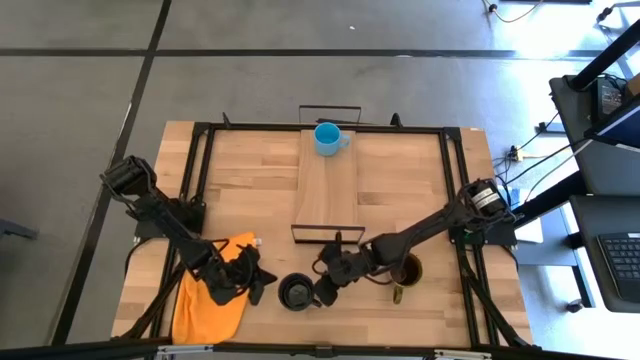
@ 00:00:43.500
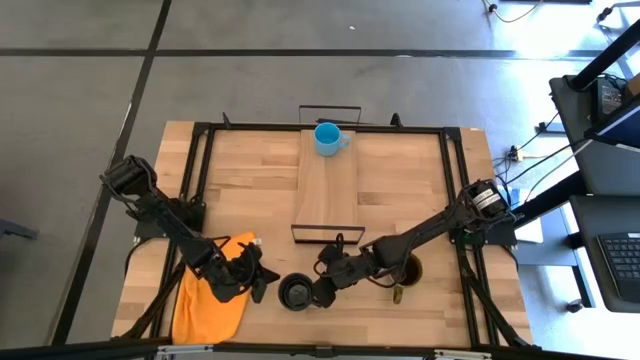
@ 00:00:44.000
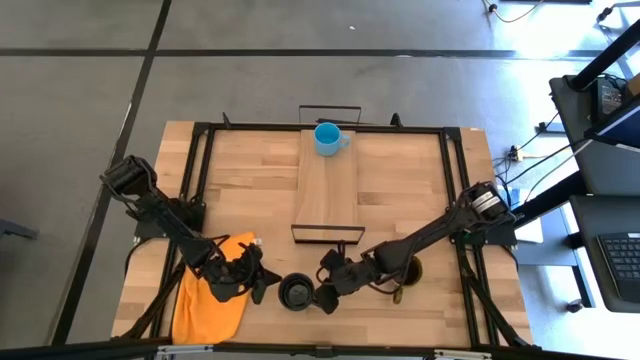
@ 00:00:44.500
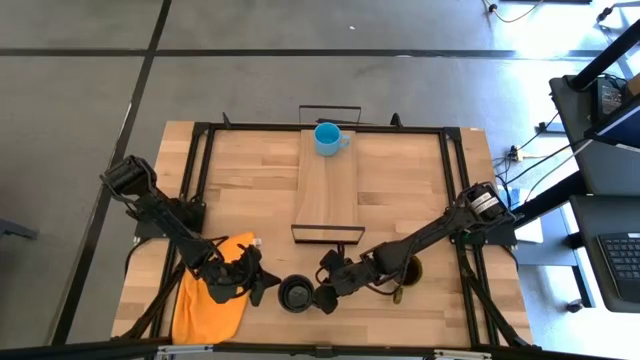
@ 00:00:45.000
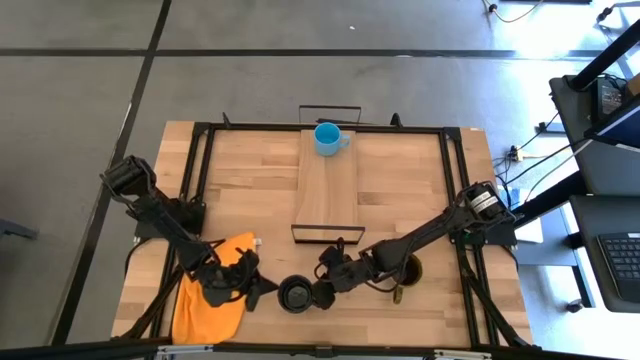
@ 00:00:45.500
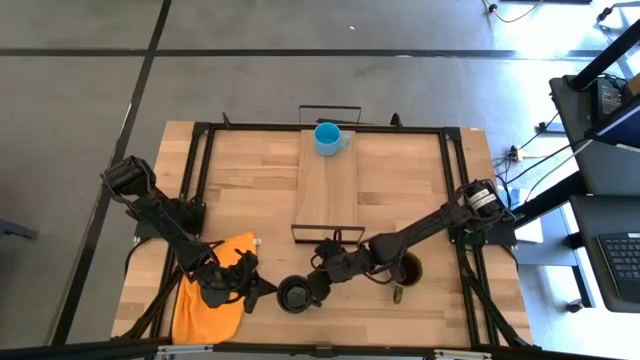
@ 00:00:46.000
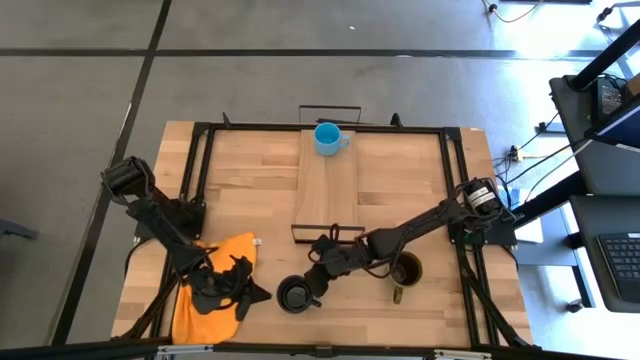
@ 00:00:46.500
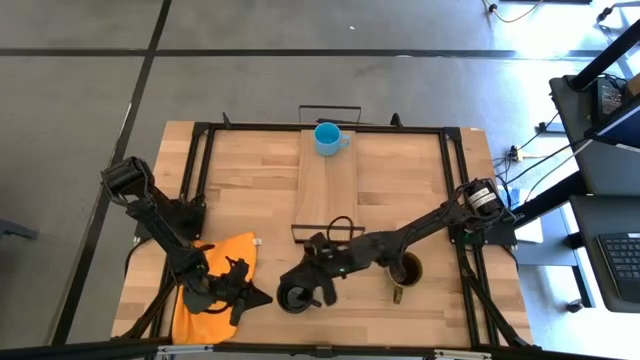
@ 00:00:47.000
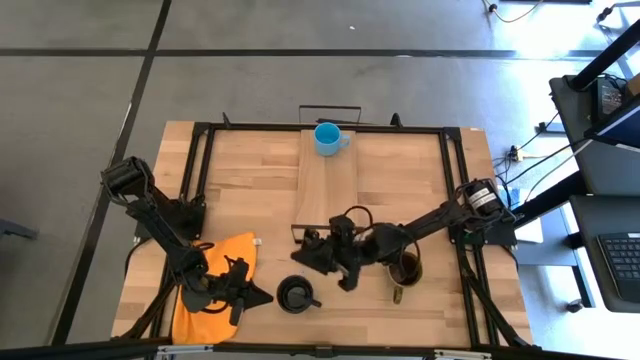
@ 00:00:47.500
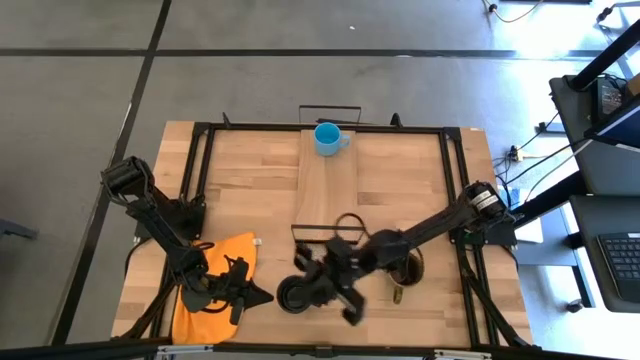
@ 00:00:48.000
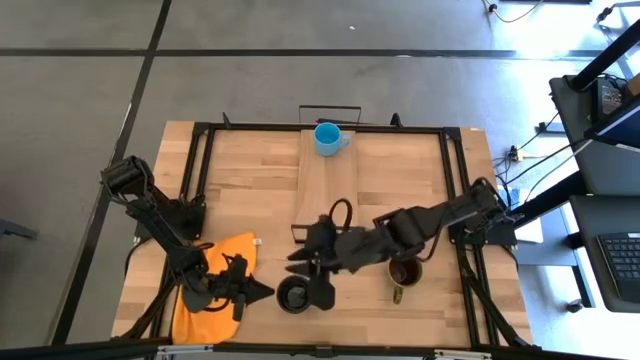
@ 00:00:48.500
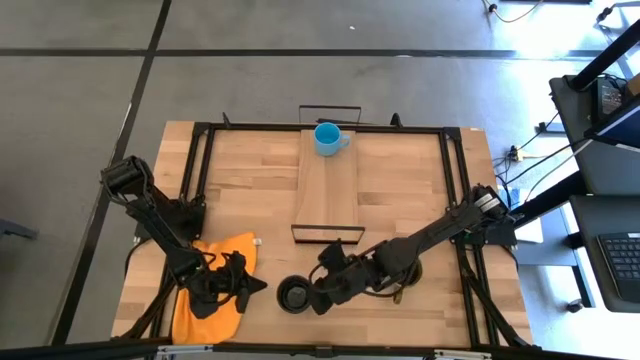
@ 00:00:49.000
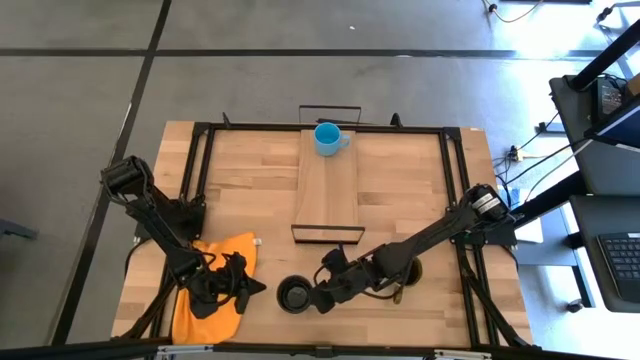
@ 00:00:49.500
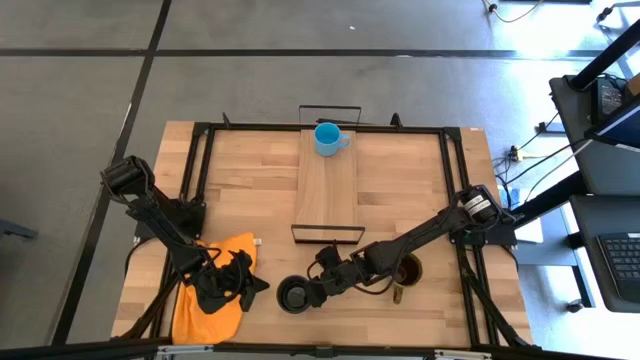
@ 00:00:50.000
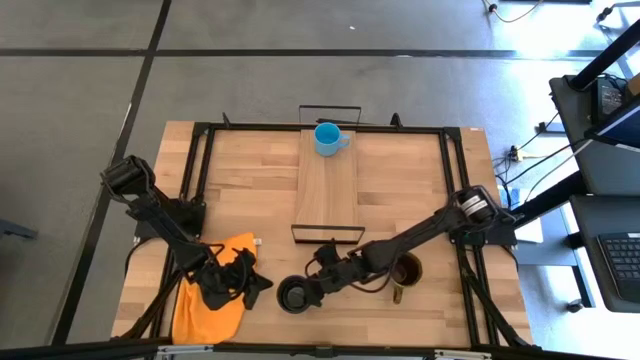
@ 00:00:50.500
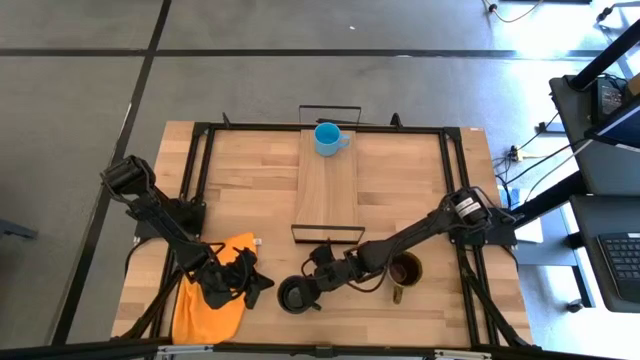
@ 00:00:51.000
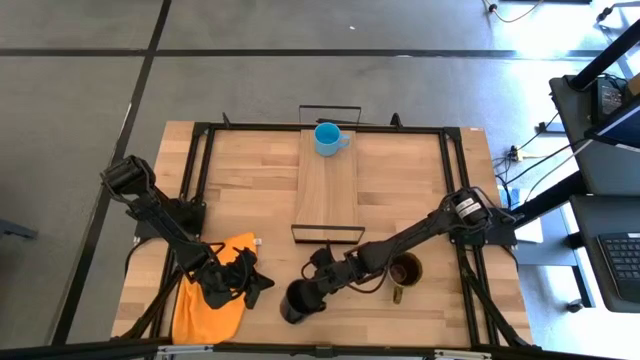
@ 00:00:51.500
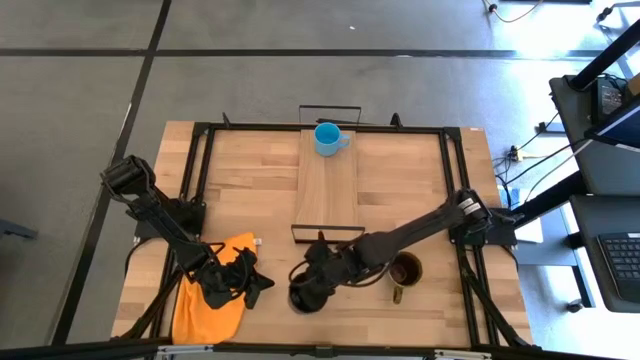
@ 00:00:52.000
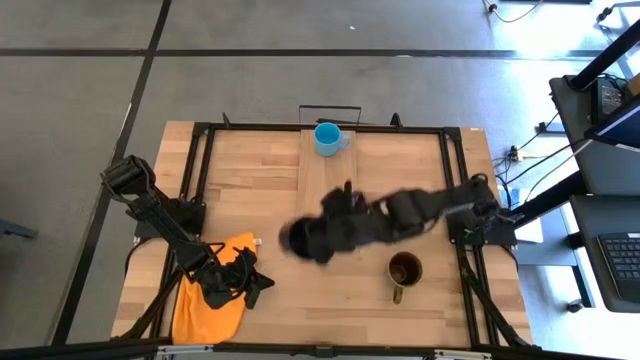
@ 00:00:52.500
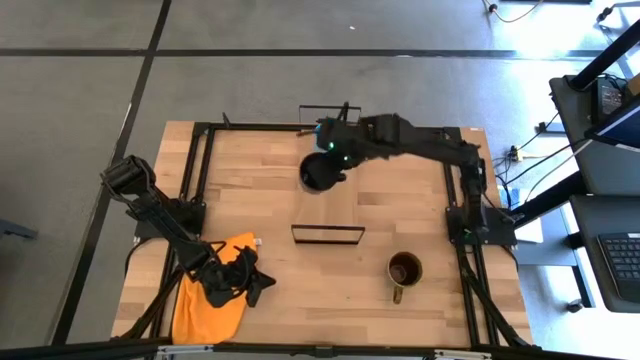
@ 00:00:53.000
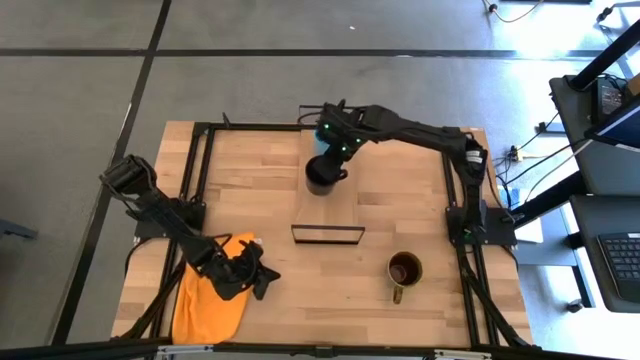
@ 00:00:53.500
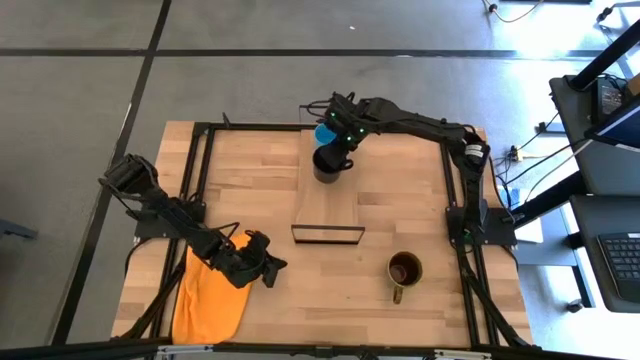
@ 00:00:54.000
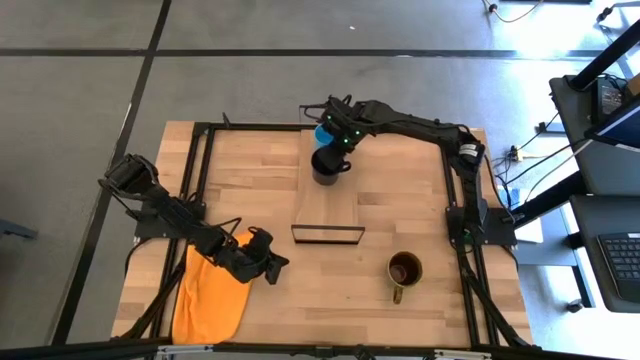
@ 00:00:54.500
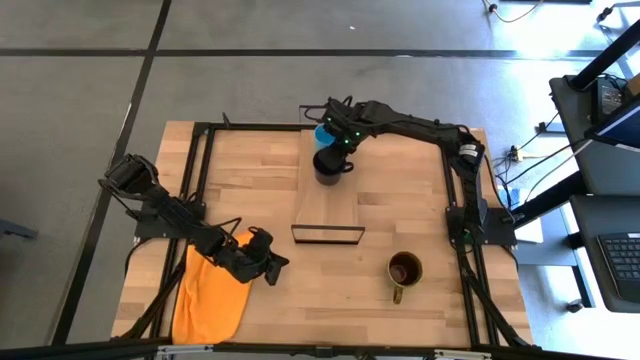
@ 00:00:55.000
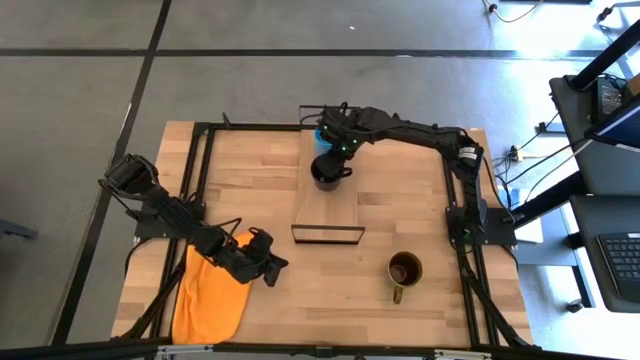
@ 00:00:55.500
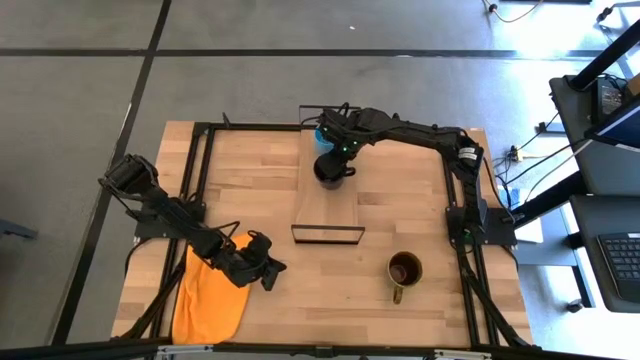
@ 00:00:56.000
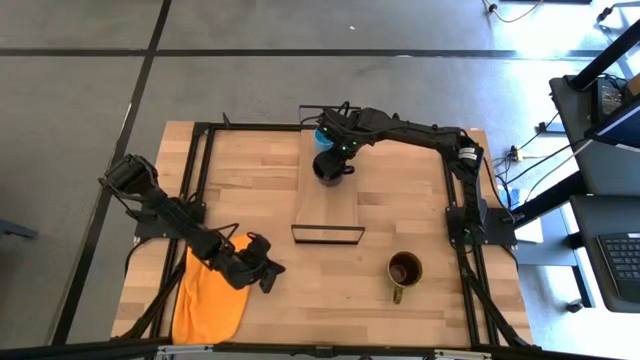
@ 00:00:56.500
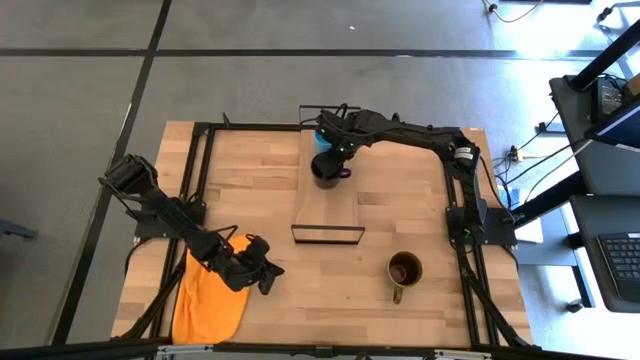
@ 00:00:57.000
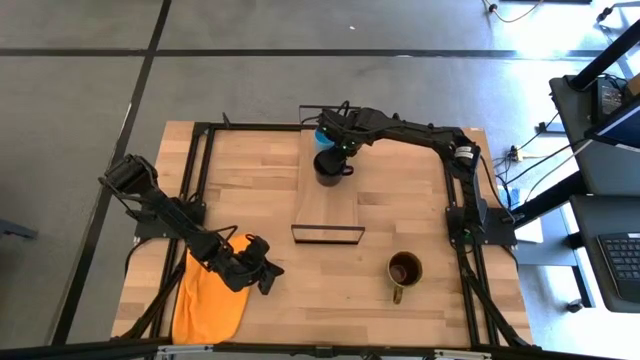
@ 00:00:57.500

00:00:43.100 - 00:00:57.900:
Task: Stack small to large cups/mugs on shelf
Put the dark blue mug on the shelf

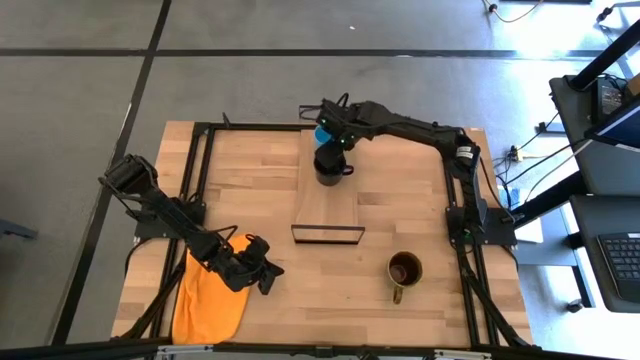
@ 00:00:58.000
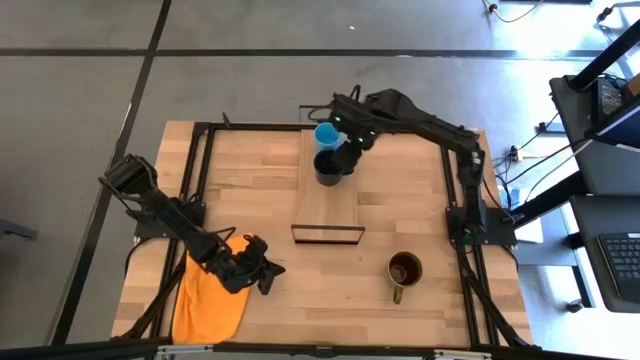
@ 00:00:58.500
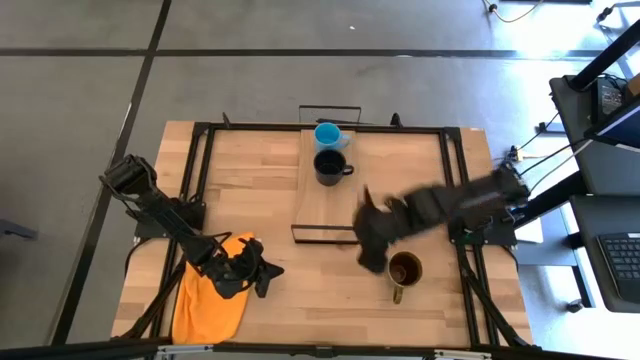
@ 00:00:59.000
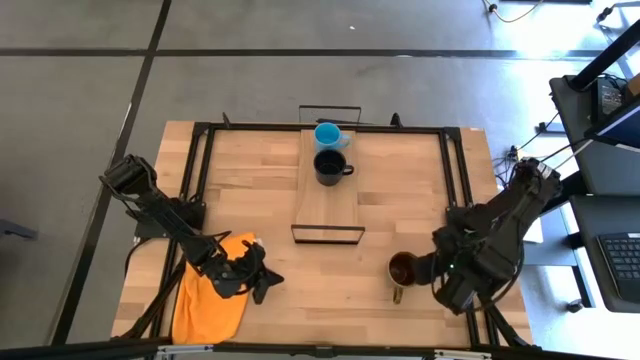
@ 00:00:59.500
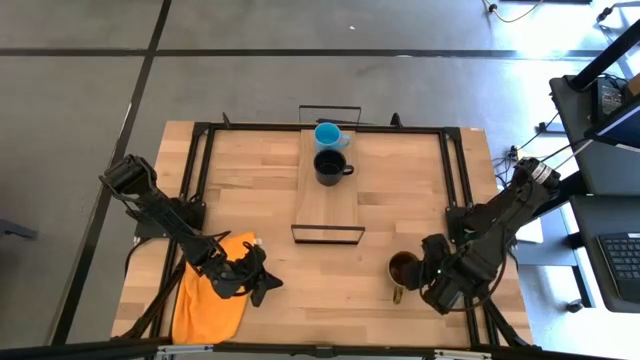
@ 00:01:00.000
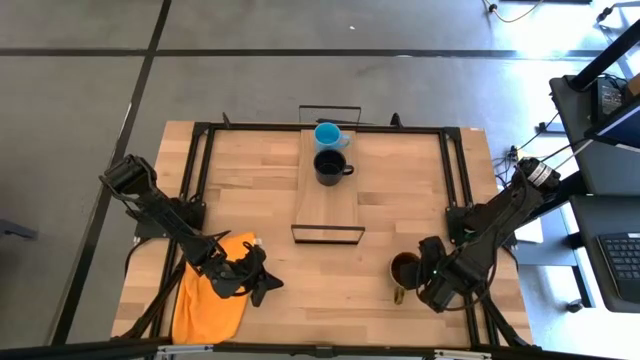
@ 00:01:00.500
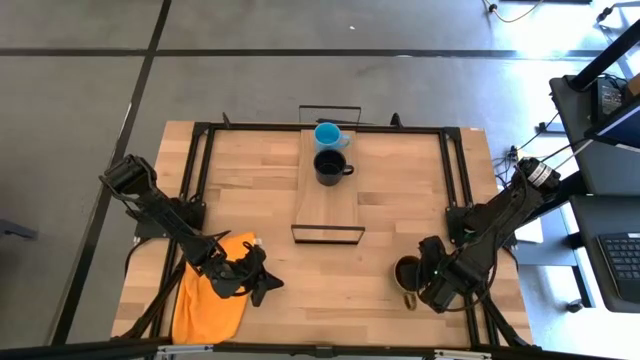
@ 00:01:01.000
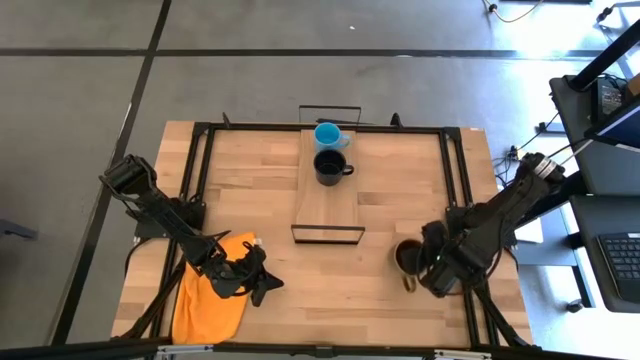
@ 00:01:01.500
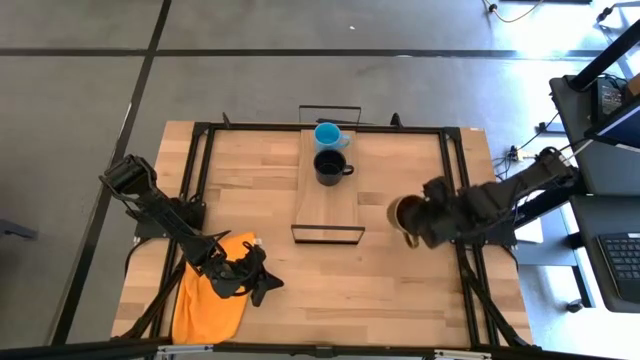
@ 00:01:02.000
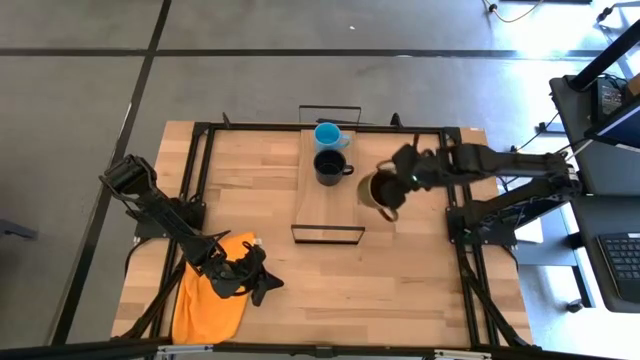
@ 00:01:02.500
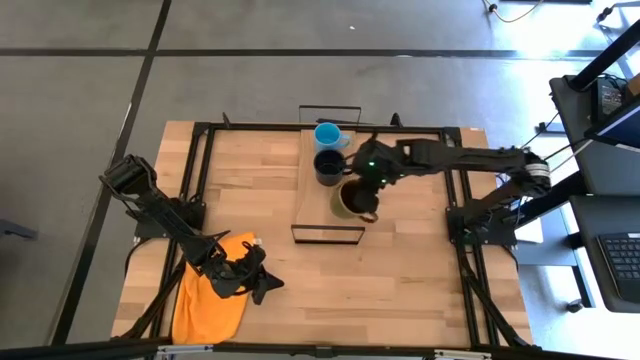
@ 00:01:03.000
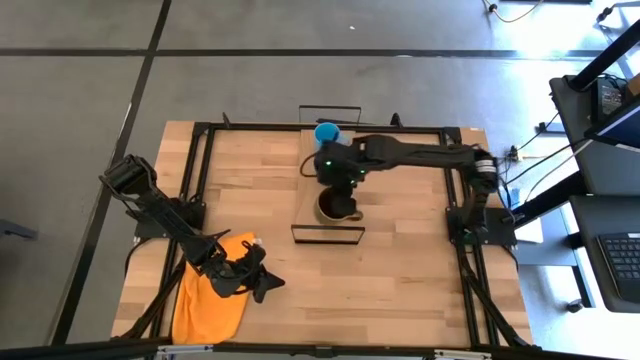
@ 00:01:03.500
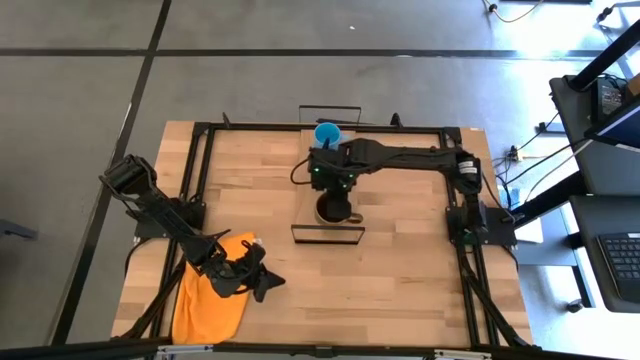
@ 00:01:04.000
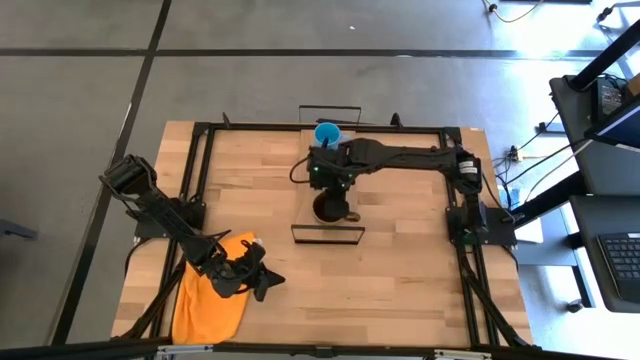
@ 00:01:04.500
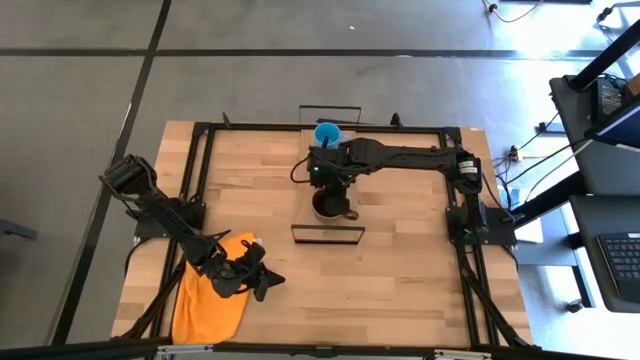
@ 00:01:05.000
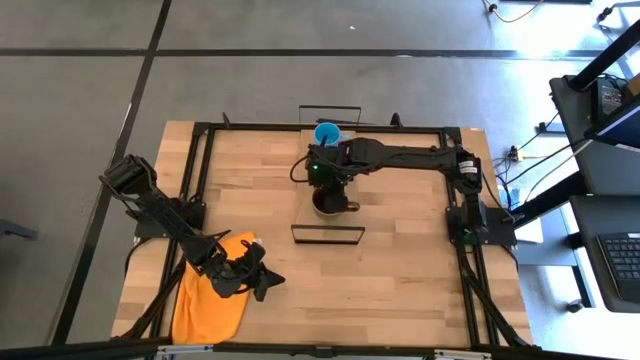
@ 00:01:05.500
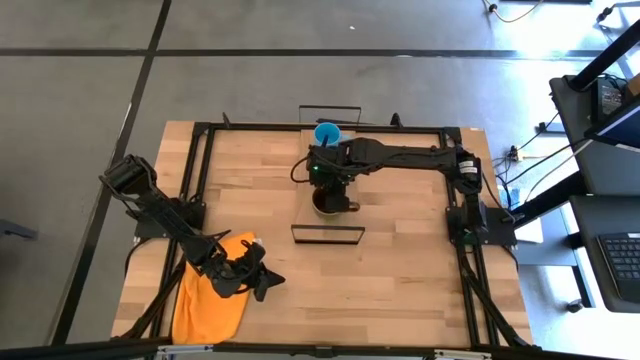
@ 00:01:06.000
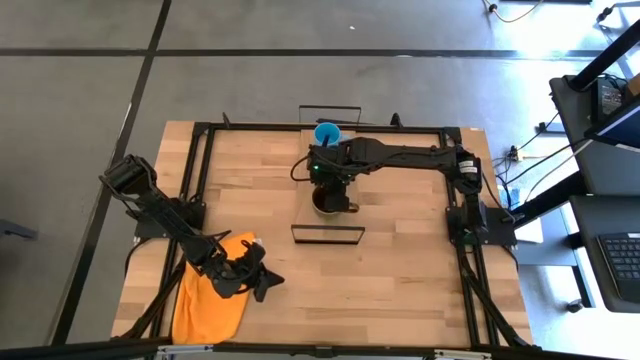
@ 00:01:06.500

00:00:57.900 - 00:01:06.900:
Put the green mug on the shelf
